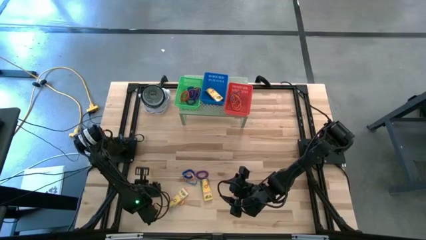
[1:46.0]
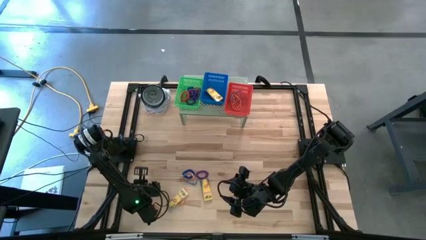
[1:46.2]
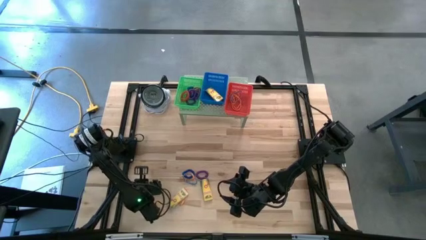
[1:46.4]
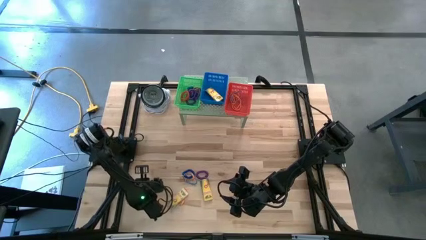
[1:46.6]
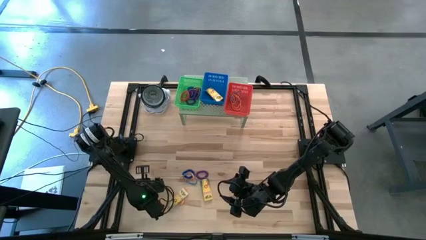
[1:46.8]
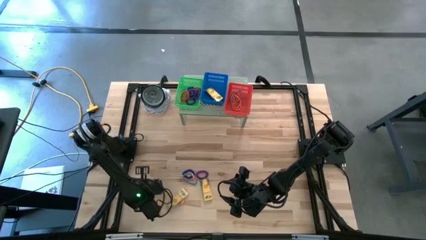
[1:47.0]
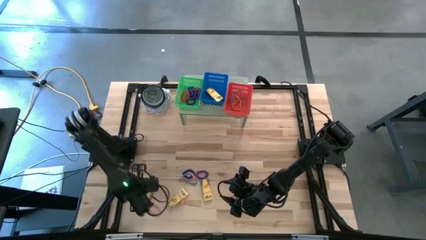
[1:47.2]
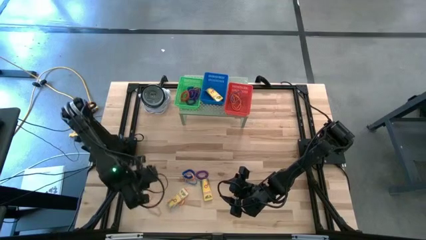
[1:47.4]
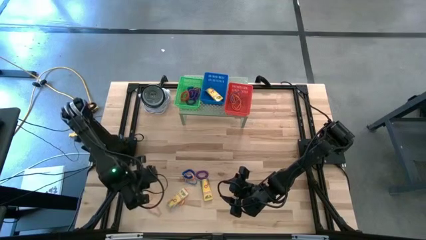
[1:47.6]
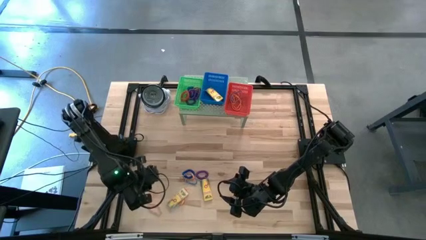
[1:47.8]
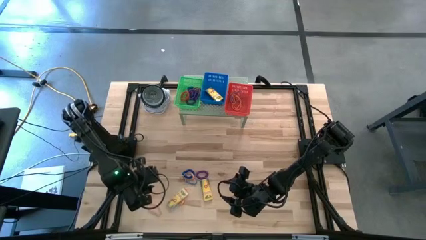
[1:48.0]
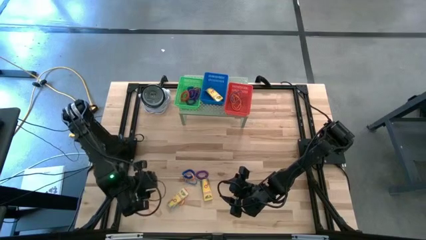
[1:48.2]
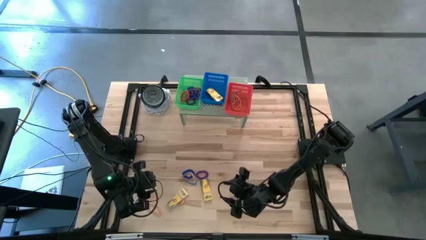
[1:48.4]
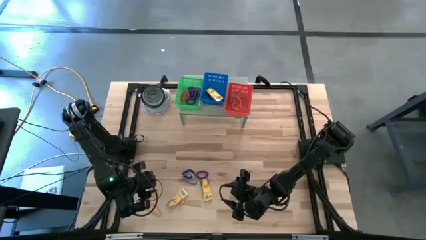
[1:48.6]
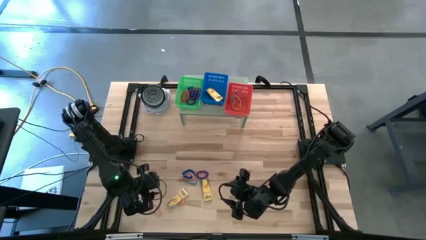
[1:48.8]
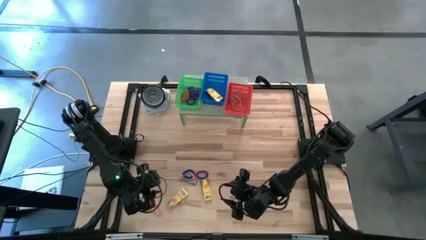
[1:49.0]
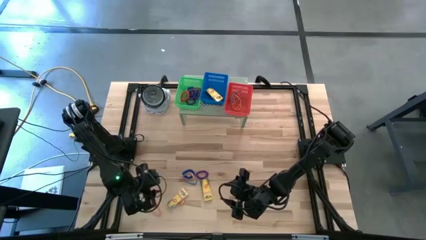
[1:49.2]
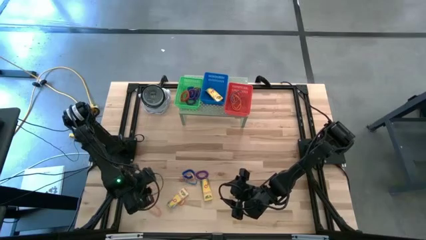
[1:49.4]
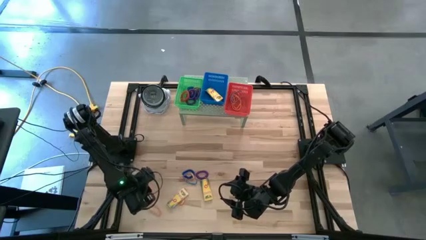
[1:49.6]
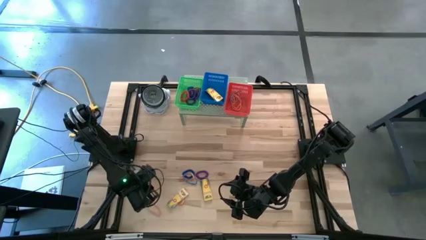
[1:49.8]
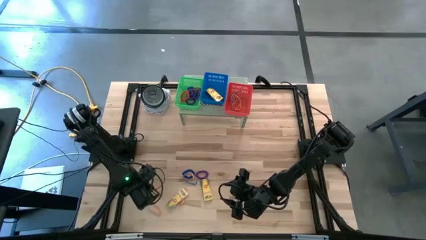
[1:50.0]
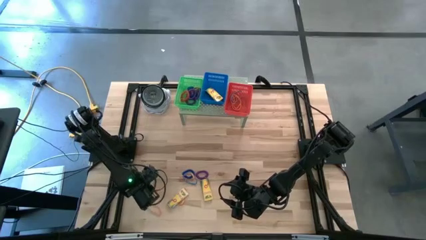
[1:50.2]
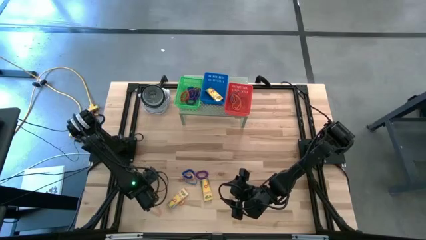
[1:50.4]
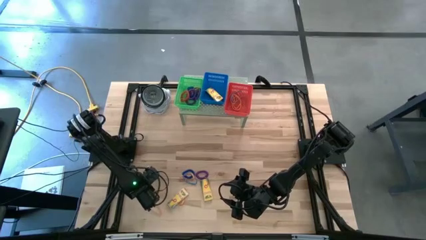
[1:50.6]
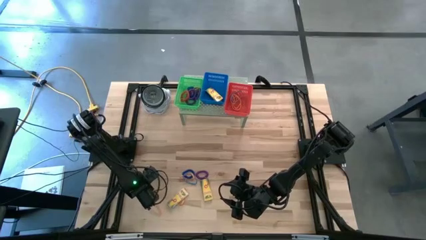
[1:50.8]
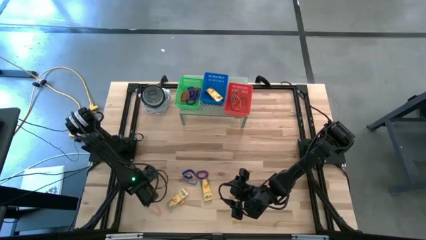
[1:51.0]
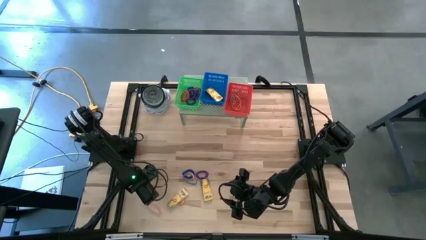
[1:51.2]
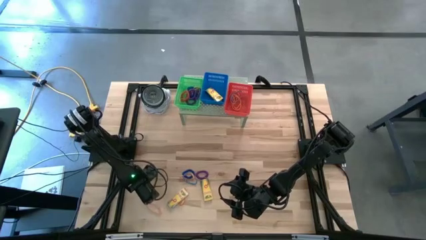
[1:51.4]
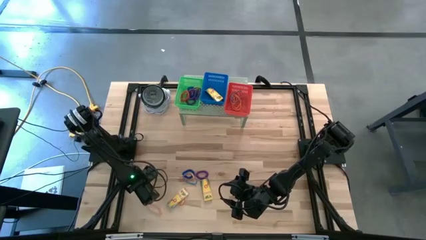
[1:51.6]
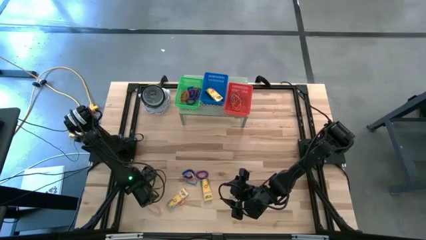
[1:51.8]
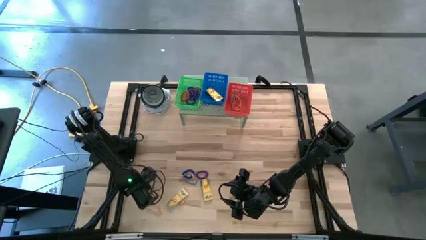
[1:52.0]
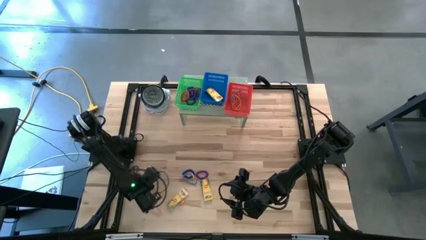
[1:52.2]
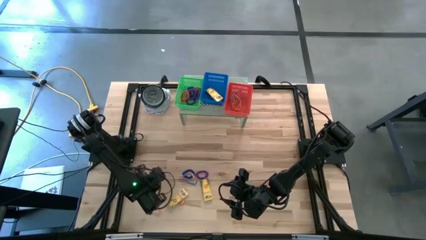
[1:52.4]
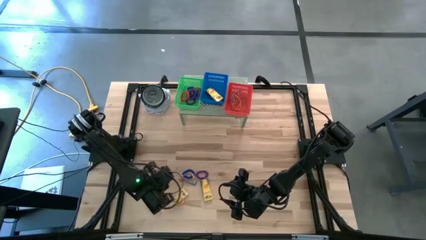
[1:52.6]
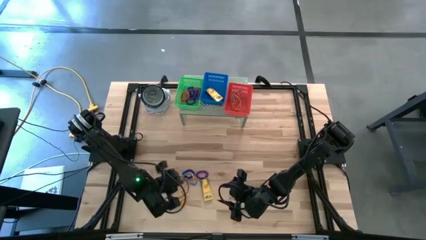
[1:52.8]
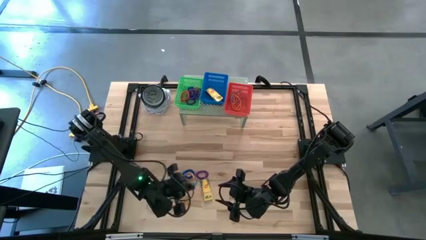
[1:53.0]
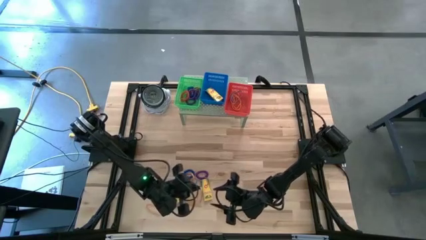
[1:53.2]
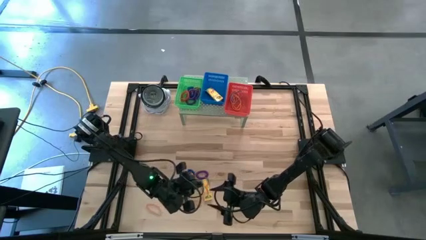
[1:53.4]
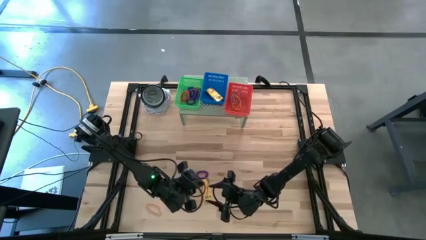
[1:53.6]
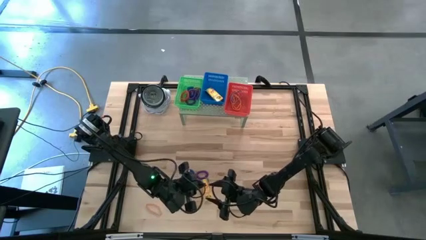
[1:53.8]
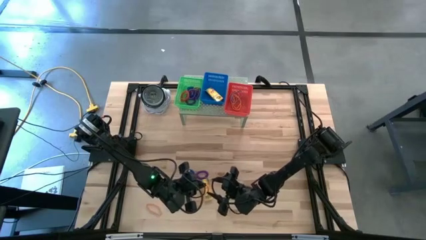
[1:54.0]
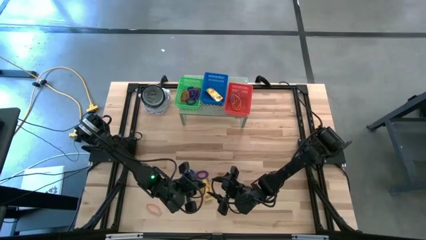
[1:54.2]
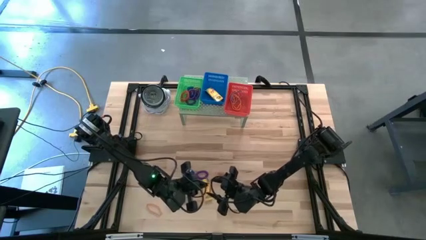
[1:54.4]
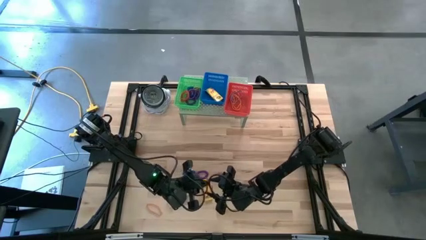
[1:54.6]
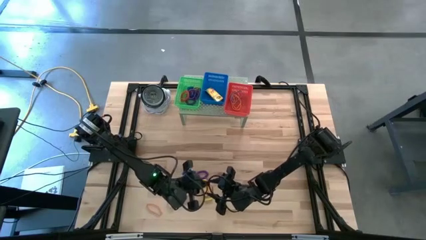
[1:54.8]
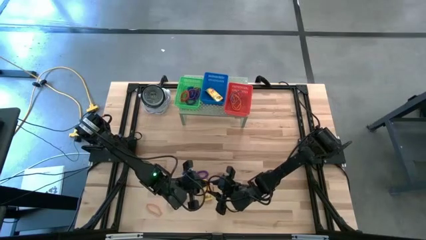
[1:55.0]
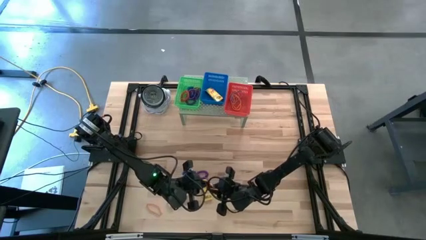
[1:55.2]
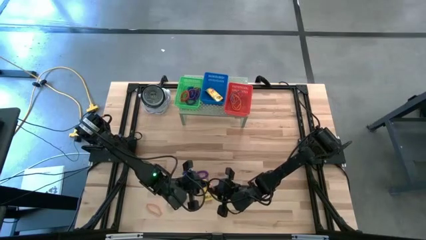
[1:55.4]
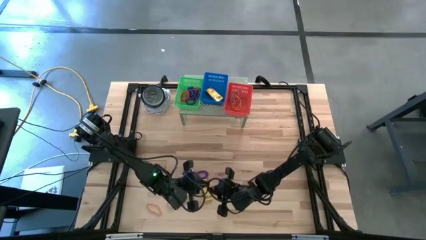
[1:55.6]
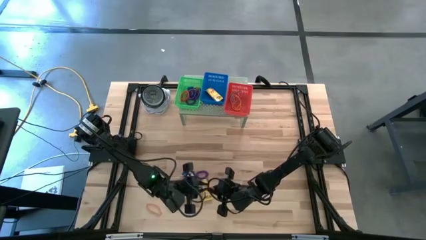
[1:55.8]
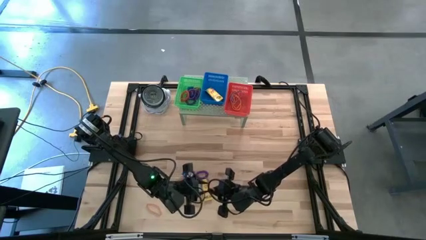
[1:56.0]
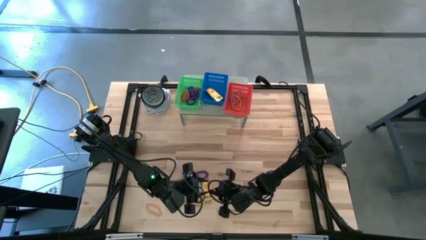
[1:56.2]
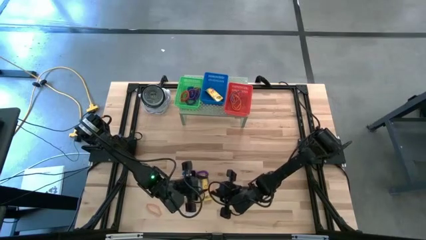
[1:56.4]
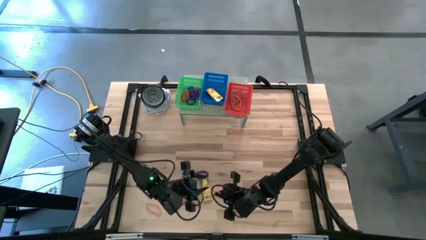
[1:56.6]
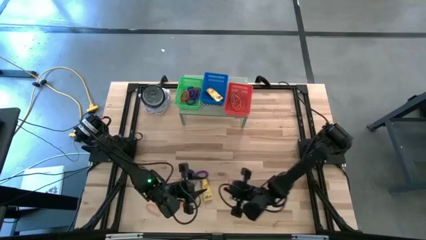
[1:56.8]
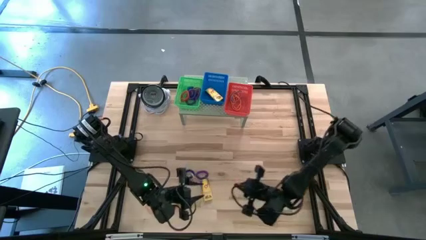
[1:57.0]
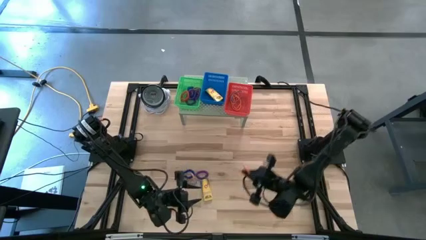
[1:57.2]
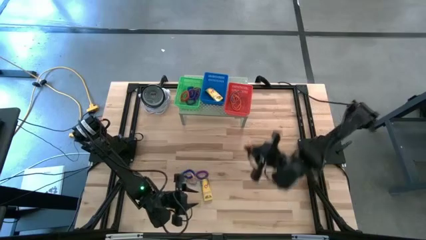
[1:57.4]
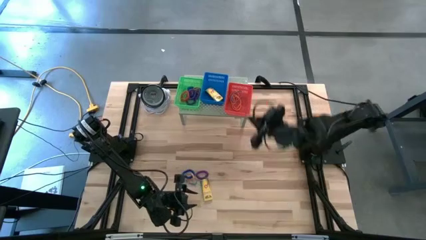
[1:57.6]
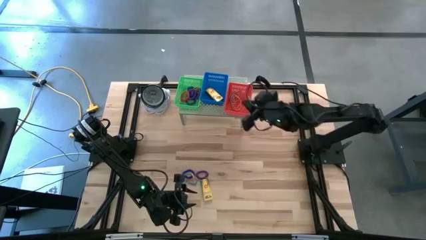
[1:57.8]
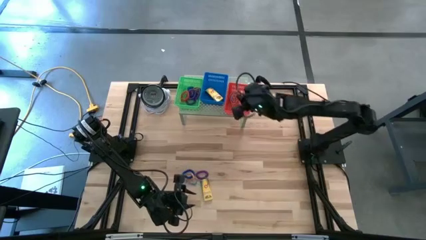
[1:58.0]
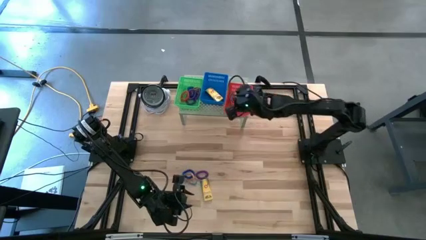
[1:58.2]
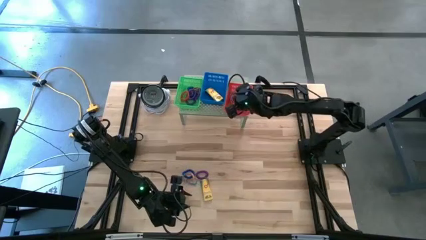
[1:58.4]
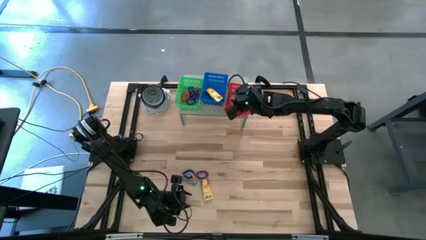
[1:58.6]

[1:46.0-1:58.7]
Task: Pick & Place Office Desk Supplies
Put the orange rubber band into the red bin on the shelf

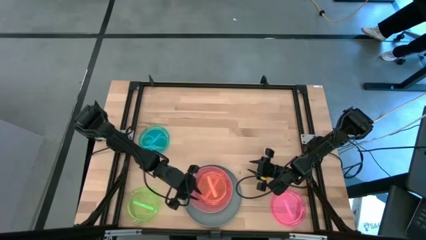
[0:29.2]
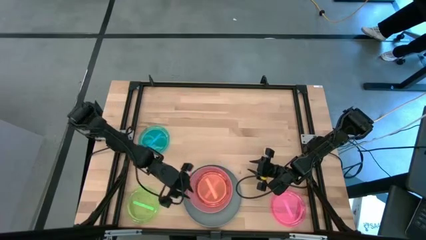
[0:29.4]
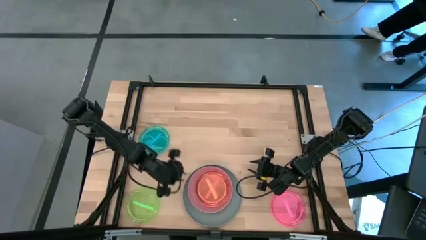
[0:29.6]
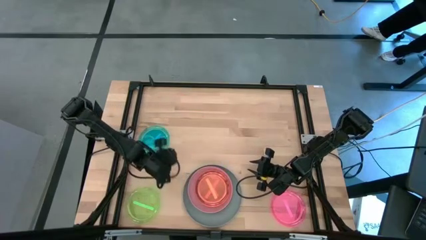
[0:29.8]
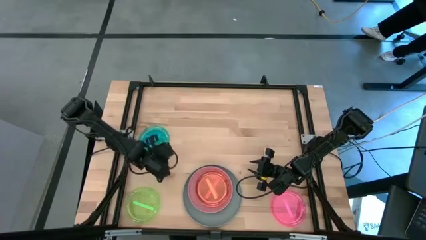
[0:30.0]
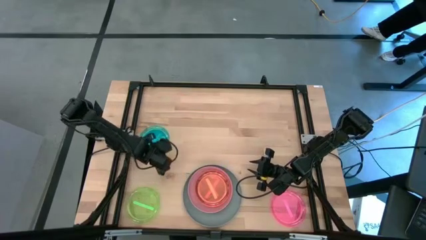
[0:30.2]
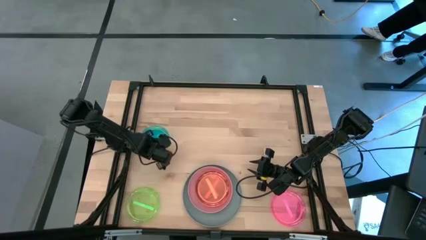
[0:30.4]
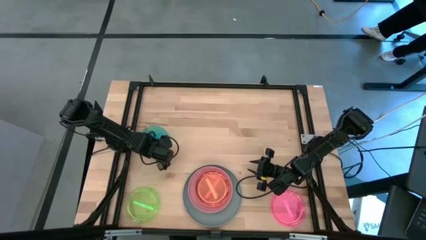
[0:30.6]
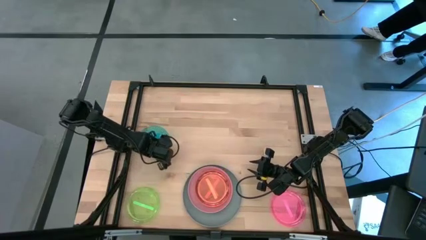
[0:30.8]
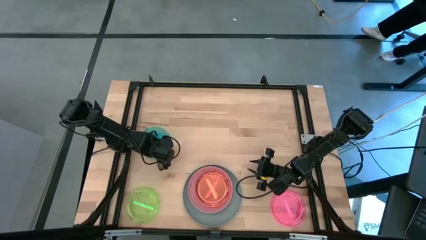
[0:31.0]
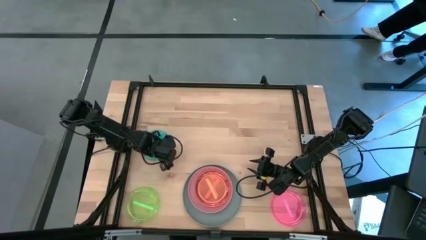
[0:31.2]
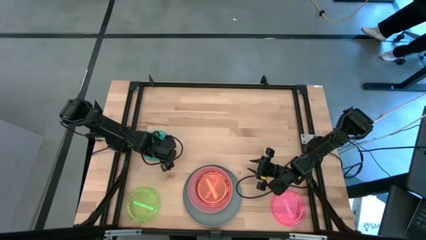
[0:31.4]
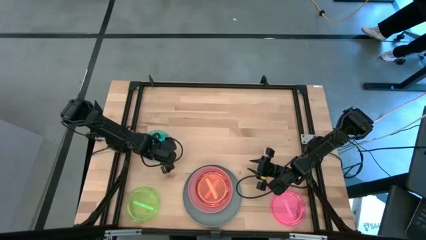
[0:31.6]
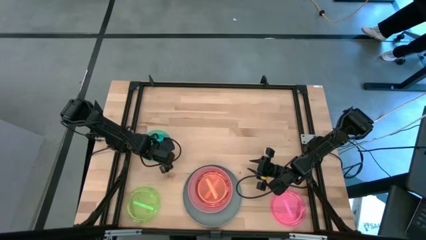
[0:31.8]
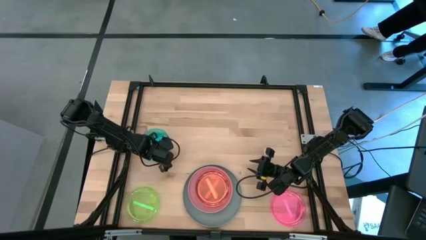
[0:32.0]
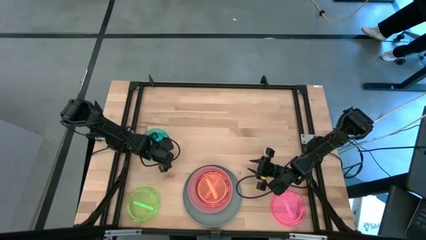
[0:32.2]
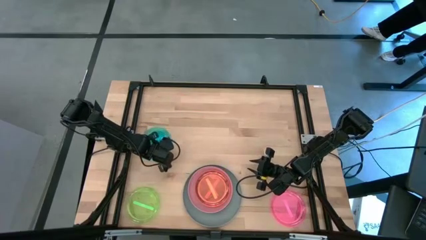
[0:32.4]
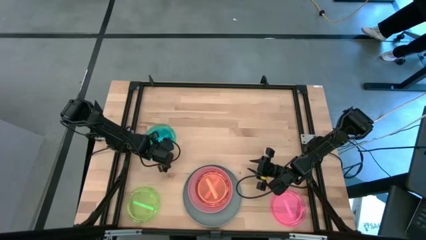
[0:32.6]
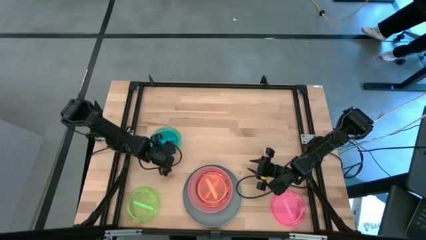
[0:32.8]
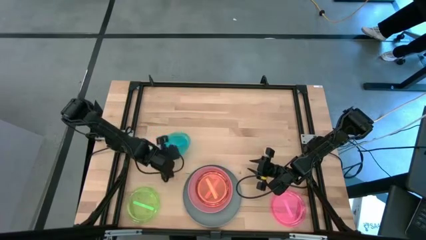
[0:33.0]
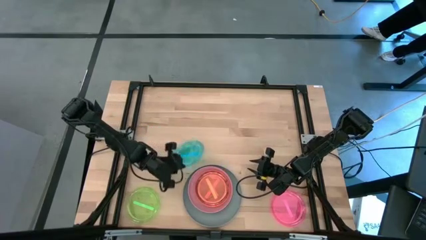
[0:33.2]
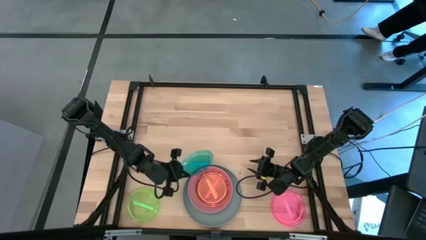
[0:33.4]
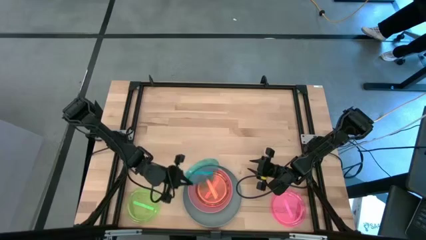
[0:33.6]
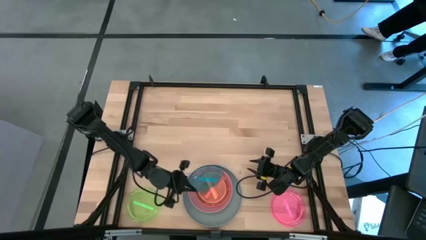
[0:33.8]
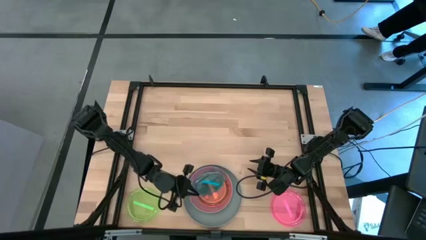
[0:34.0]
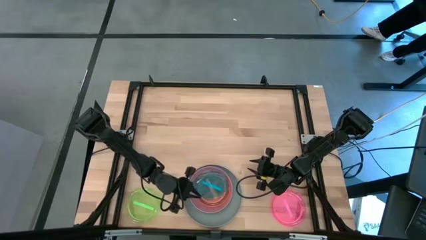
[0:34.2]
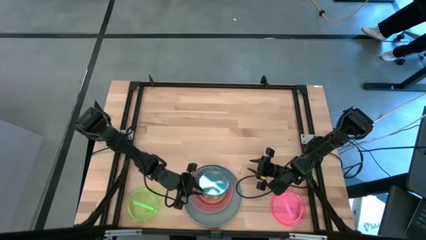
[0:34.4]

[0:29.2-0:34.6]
Task: Stack plastic plates
Stack the blue plate on top of orange plate
